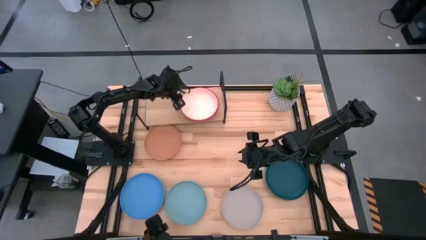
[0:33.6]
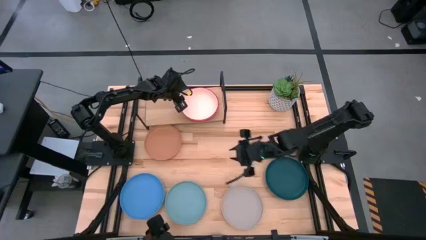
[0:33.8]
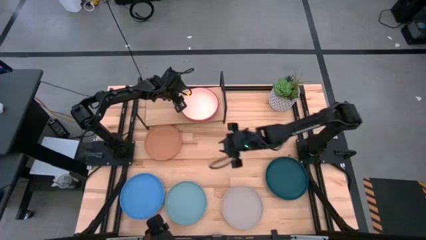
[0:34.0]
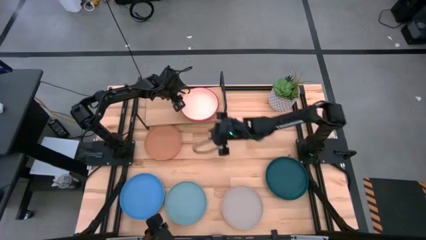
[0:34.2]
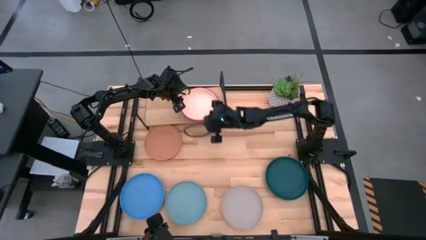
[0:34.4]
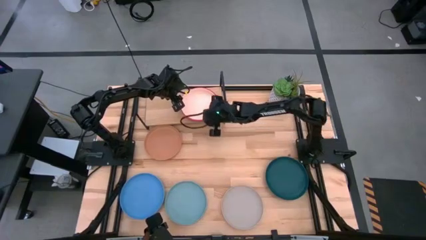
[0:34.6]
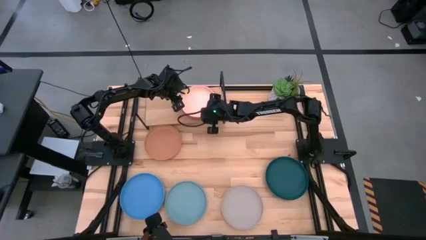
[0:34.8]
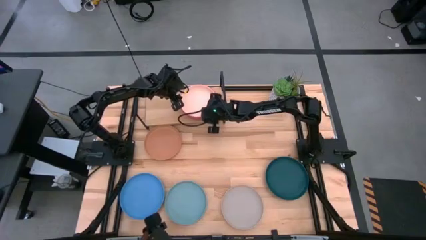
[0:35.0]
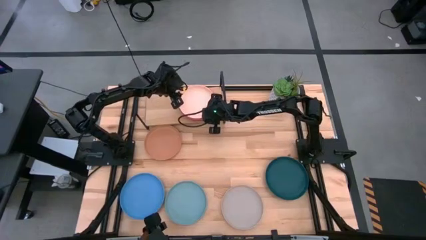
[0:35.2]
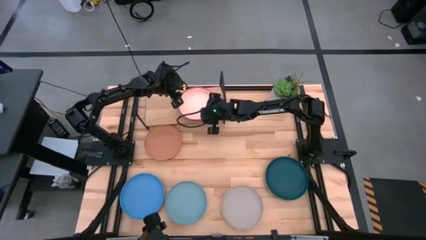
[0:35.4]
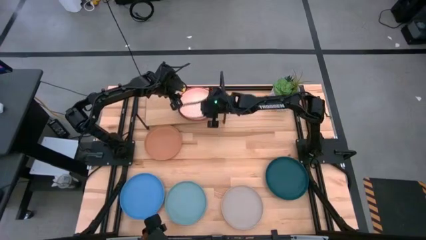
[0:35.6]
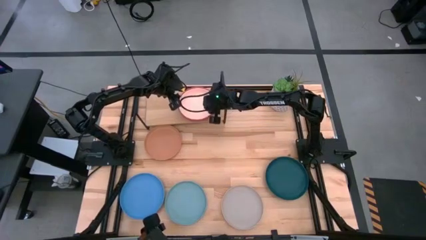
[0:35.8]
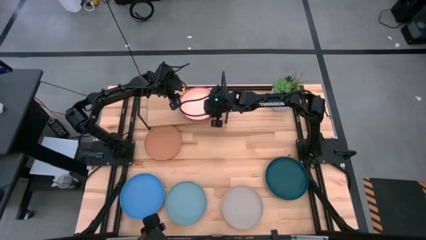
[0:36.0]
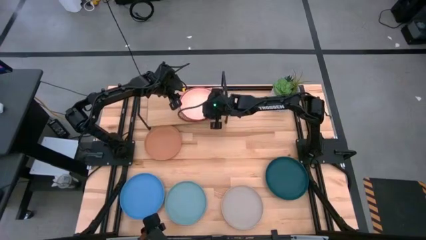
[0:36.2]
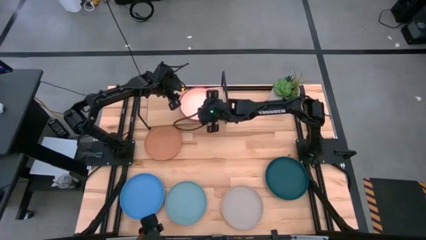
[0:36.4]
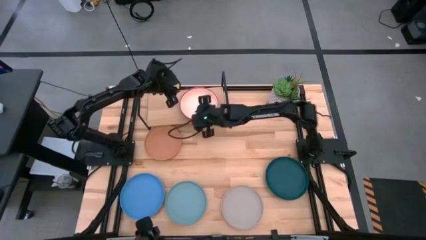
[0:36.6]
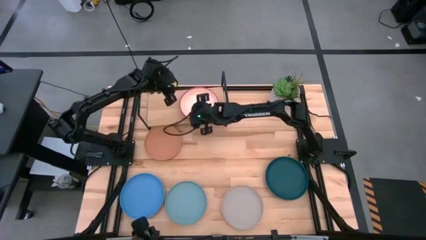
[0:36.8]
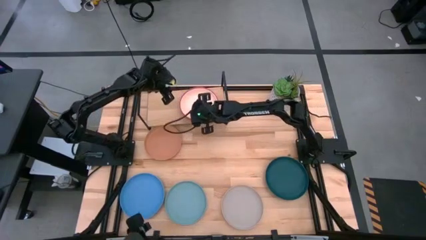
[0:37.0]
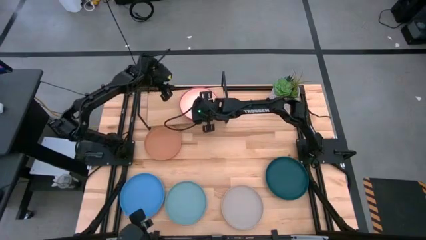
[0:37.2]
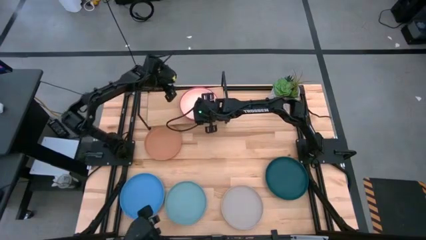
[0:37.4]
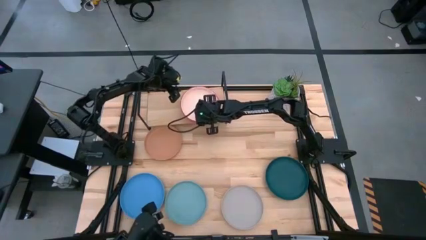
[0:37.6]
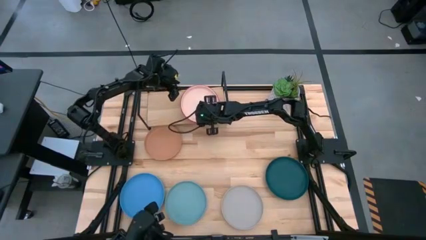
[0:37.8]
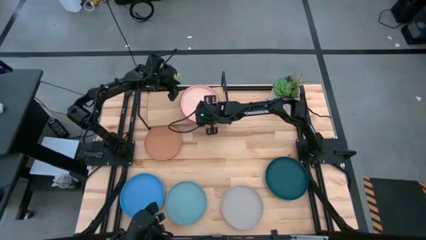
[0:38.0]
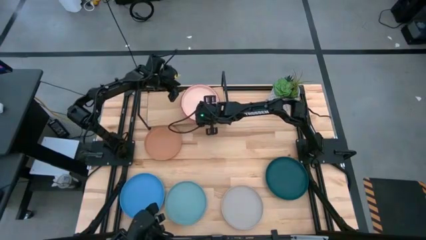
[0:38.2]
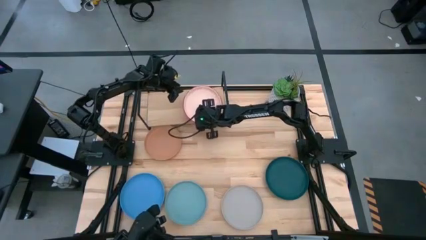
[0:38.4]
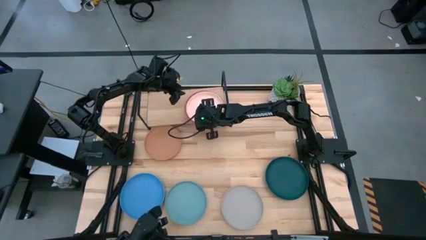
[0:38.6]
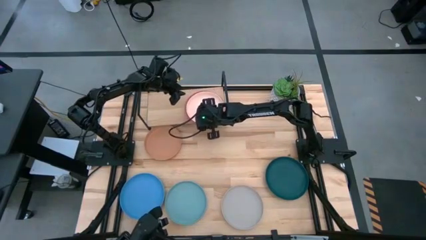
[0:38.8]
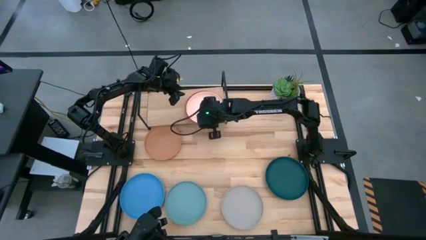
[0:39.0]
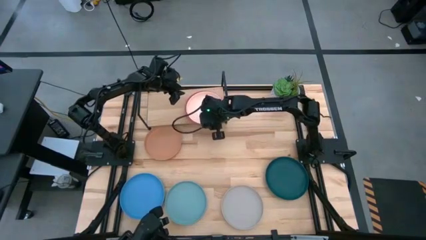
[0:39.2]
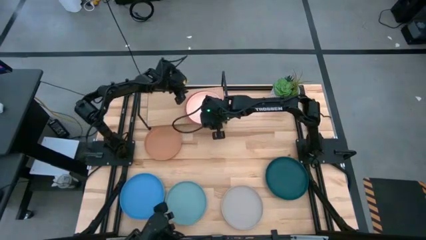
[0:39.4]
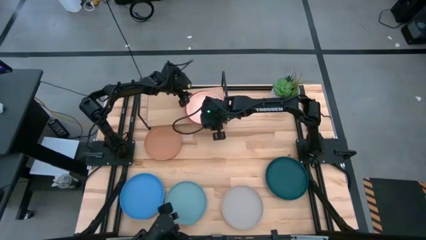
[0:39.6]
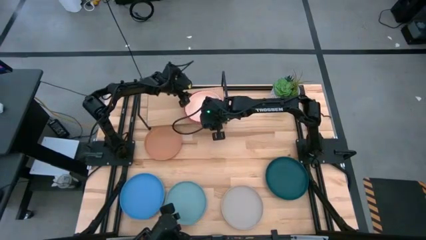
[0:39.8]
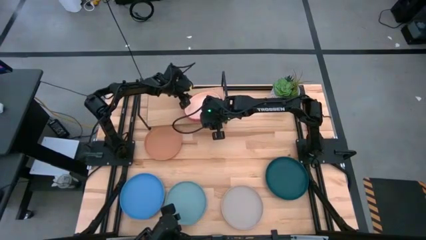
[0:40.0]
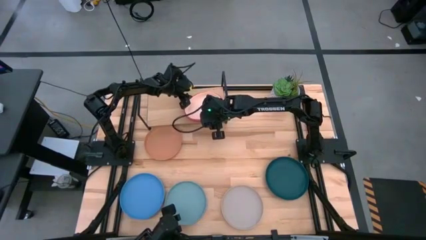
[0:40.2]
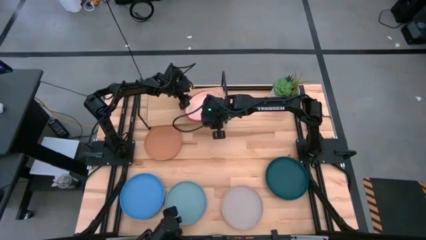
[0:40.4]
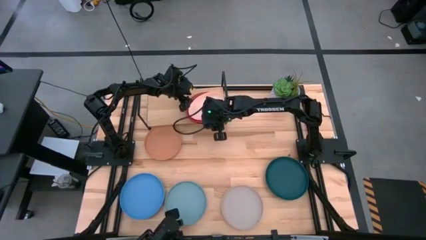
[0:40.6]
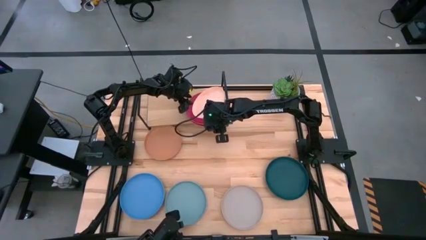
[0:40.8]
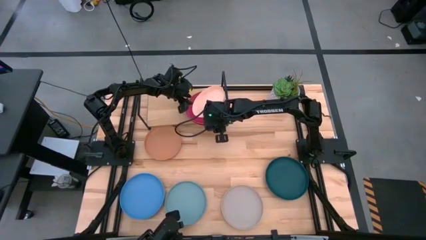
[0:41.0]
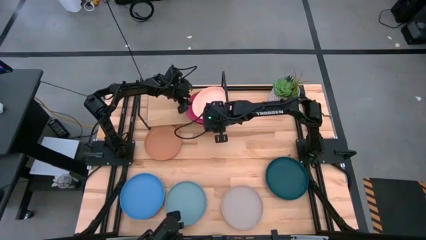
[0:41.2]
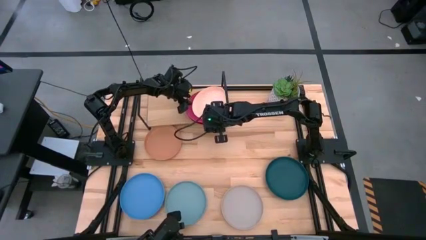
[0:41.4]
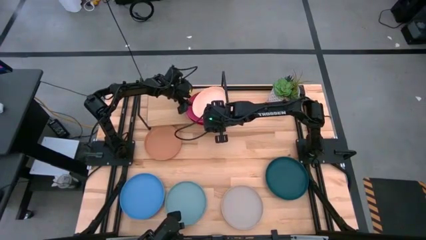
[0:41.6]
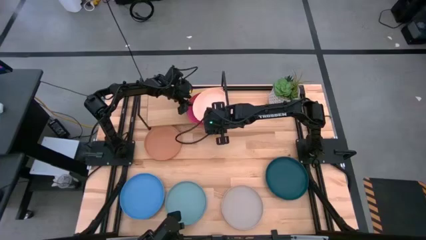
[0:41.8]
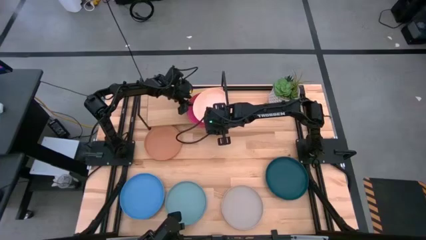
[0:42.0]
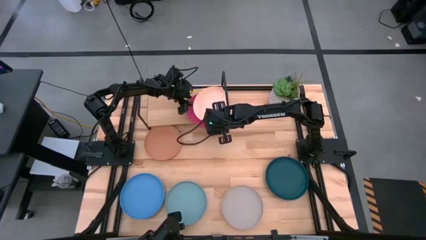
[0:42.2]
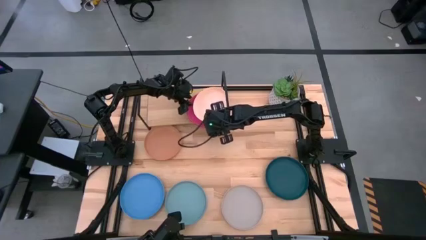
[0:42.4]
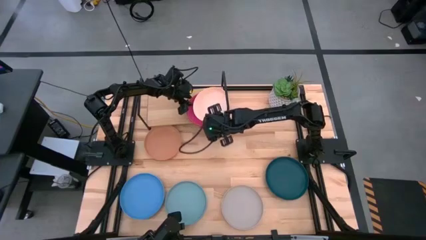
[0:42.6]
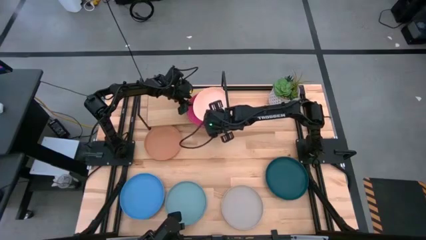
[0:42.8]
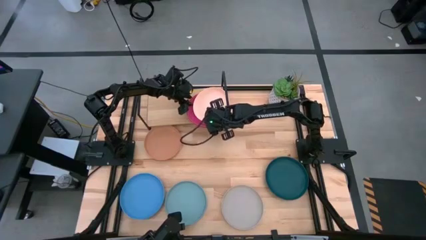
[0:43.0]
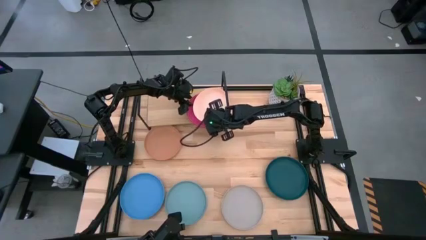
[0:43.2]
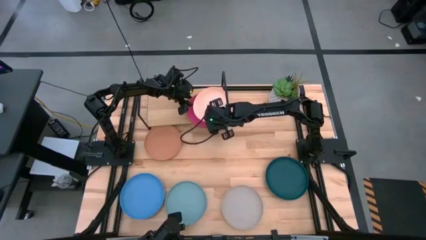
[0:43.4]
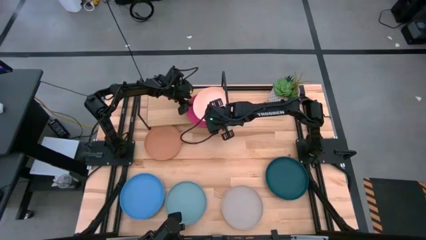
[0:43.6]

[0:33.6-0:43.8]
Task: Place and stack plates onto a shelf
Put the white plate on the shelf

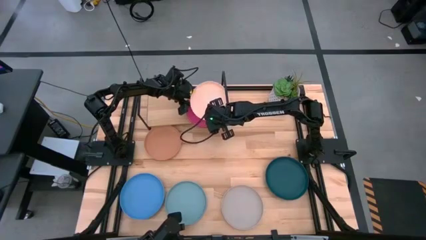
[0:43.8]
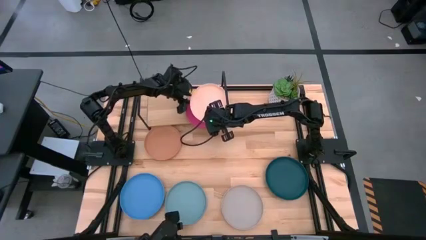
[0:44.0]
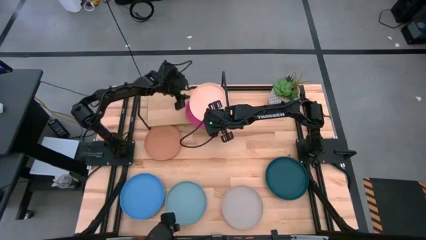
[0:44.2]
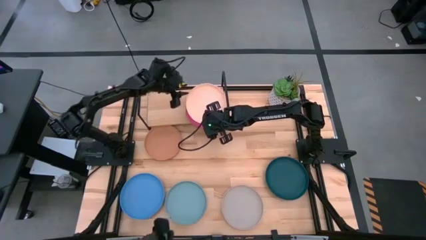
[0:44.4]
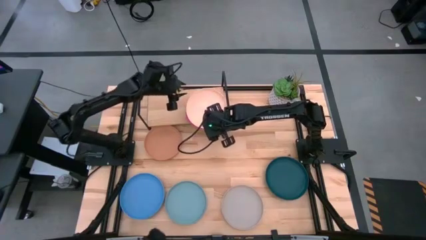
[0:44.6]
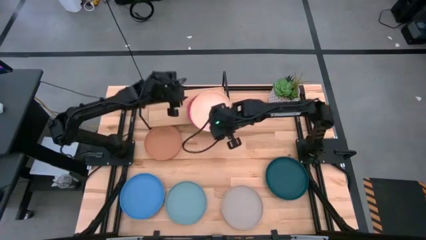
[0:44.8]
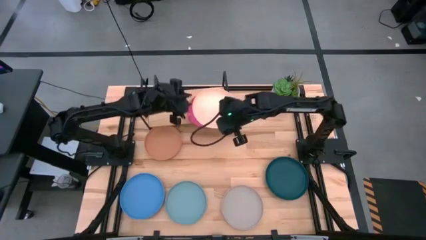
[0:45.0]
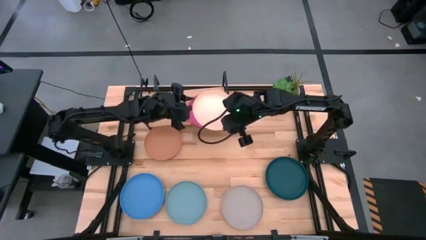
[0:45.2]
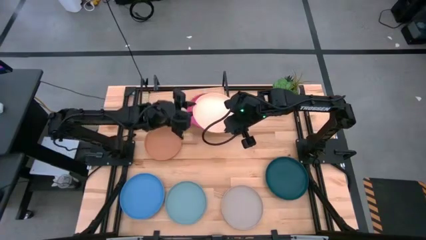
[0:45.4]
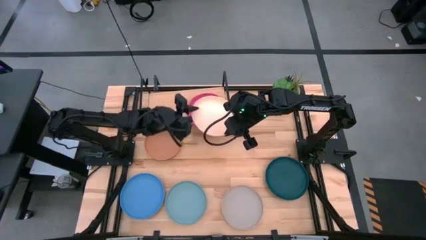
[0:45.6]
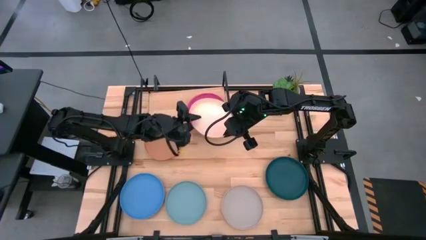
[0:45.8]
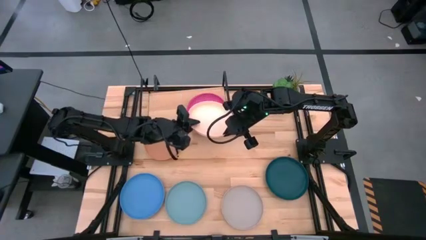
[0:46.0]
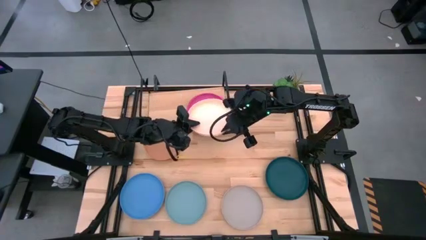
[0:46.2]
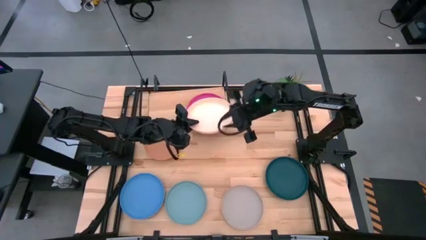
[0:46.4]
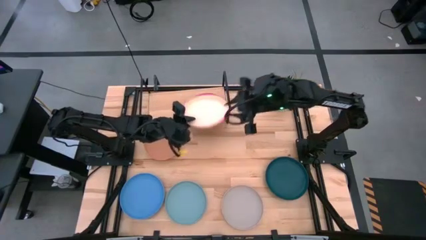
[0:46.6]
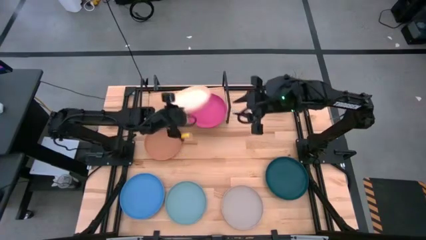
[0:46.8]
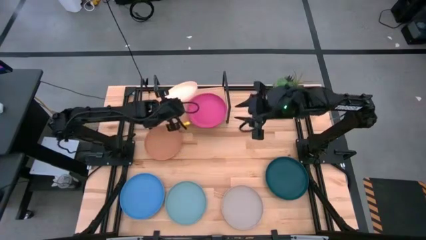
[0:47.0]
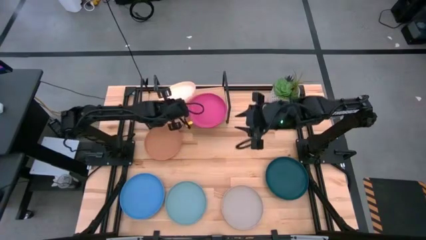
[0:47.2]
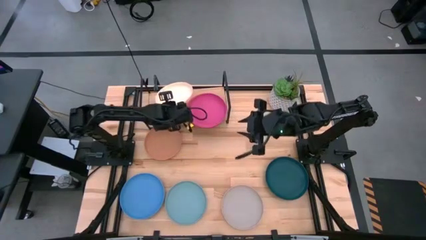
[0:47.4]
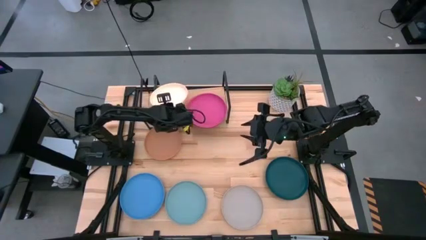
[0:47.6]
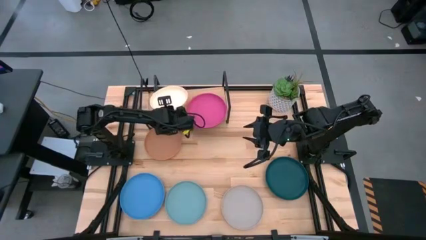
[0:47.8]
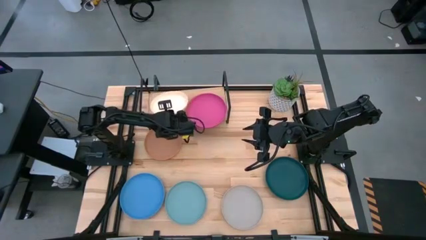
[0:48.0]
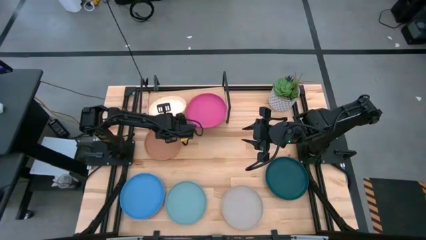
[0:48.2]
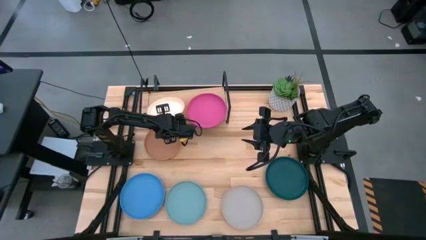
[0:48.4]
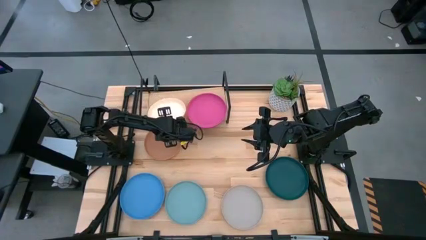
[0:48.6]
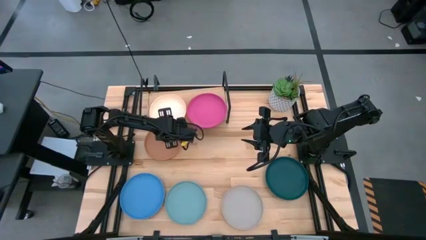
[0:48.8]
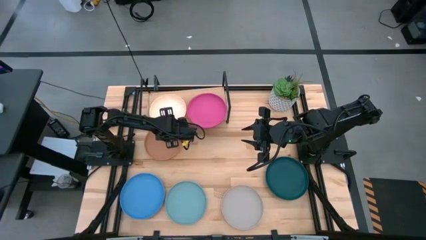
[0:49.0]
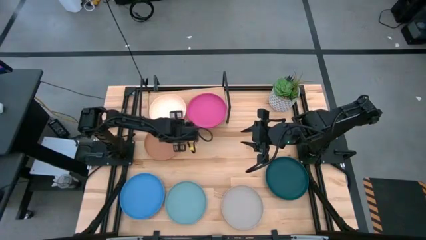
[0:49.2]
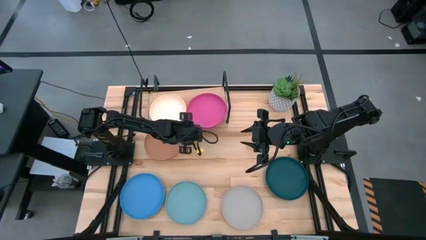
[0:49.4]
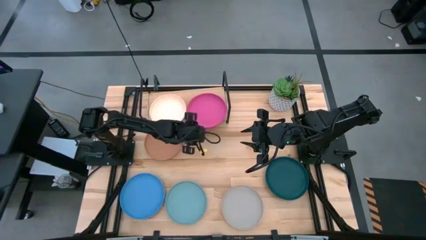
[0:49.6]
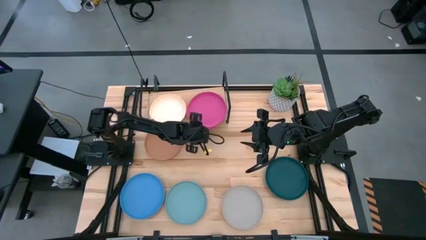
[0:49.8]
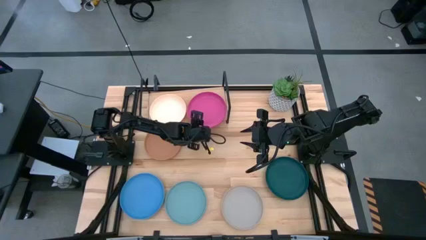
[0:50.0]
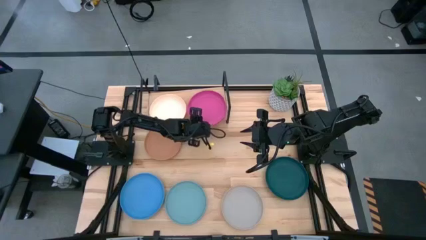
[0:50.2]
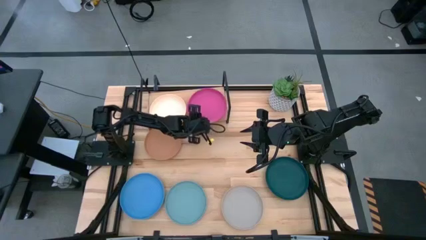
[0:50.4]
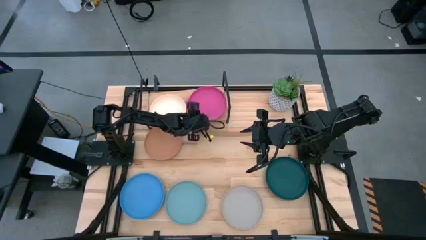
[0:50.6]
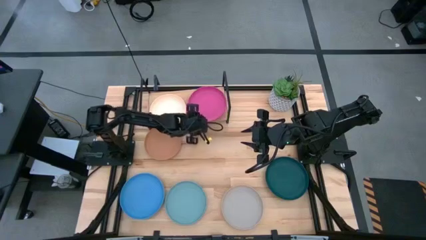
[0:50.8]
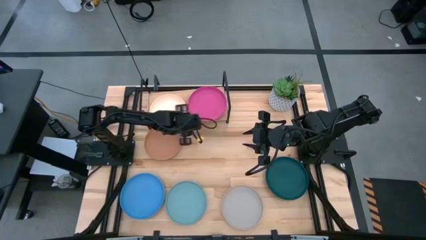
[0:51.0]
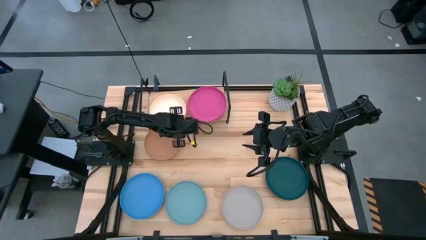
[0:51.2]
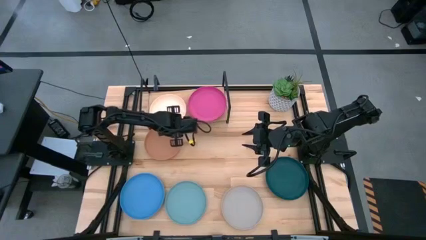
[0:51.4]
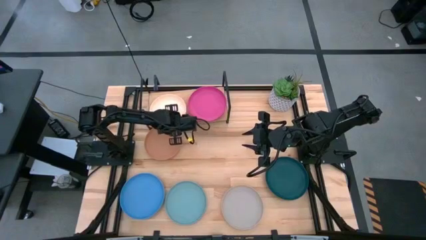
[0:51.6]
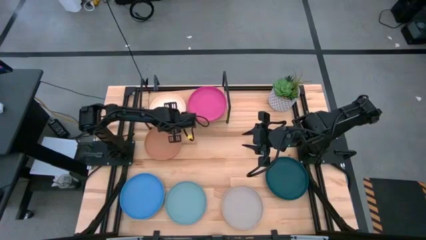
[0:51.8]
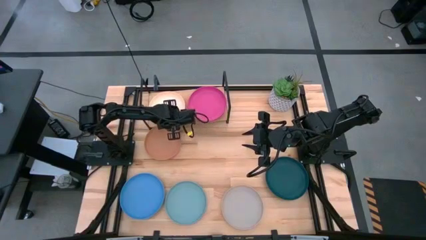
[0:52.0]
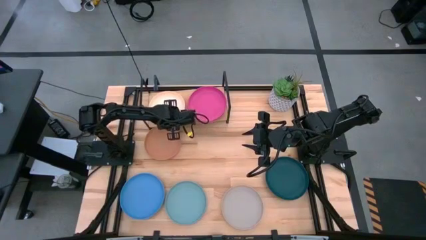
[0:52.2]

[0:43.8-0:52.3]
Put the white plate on the shelf
